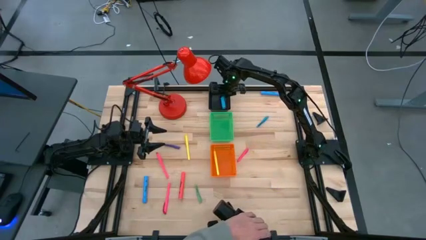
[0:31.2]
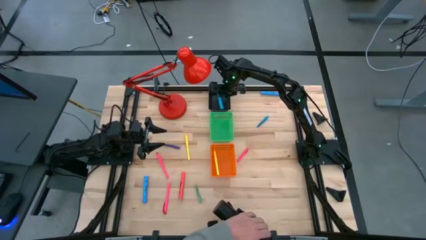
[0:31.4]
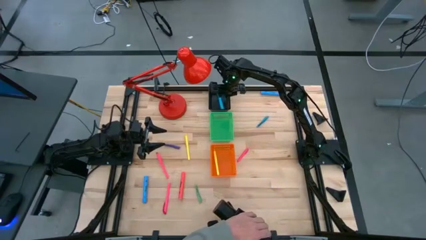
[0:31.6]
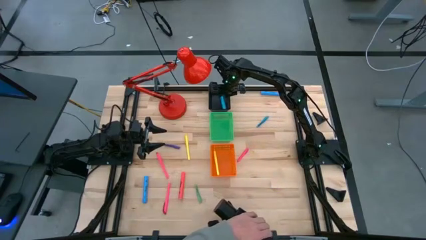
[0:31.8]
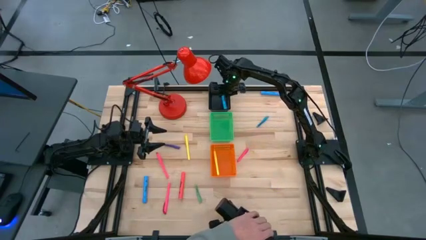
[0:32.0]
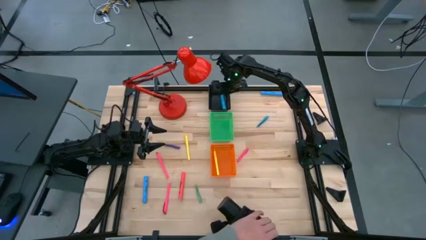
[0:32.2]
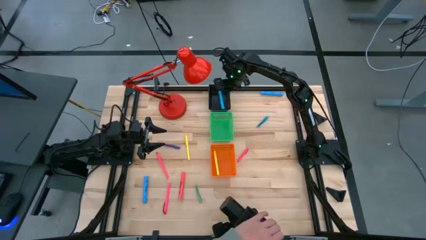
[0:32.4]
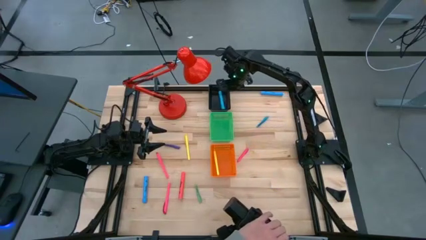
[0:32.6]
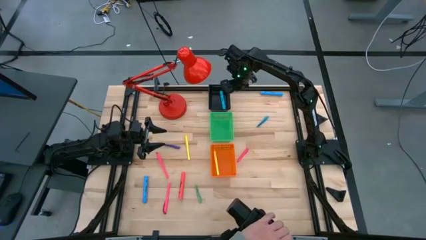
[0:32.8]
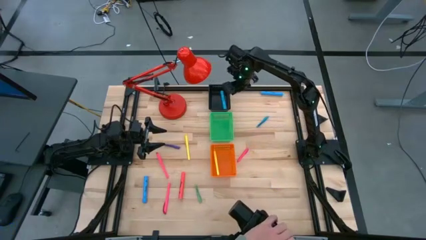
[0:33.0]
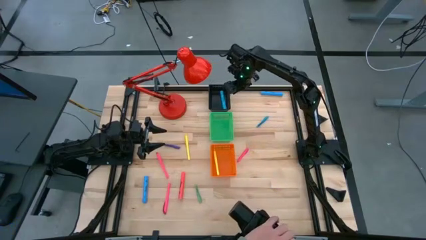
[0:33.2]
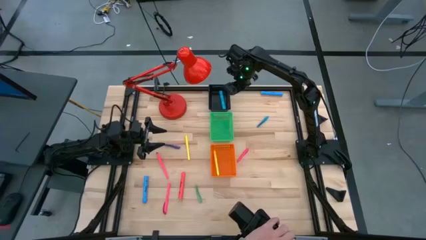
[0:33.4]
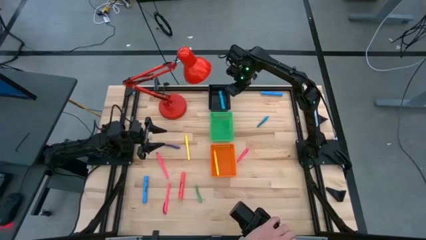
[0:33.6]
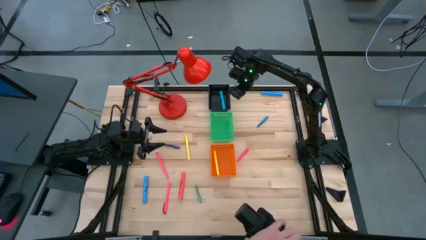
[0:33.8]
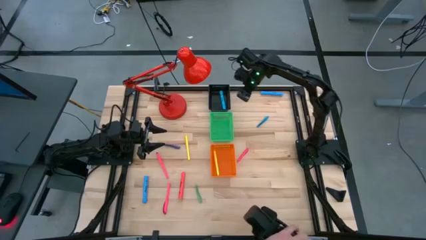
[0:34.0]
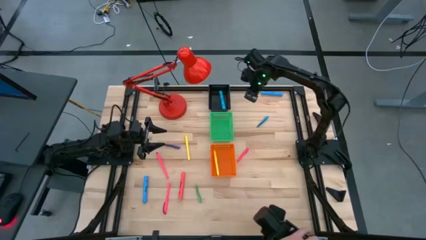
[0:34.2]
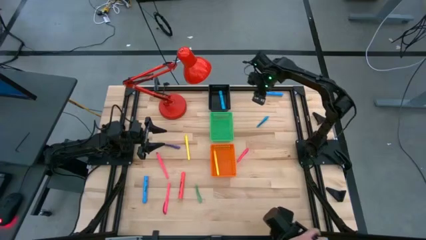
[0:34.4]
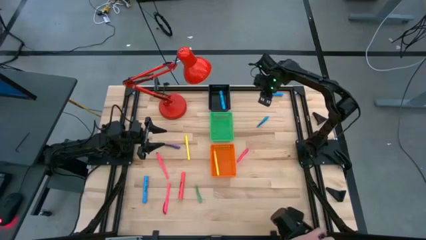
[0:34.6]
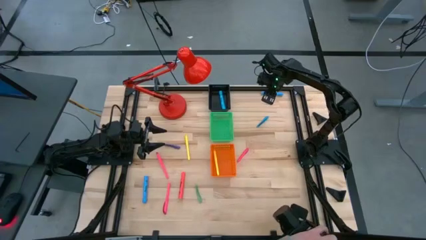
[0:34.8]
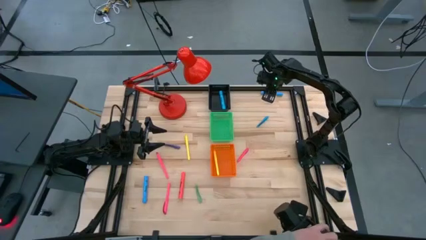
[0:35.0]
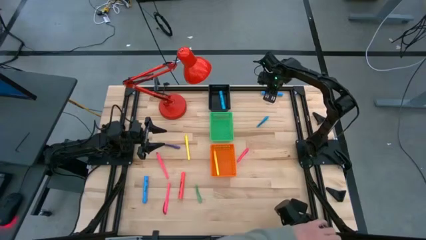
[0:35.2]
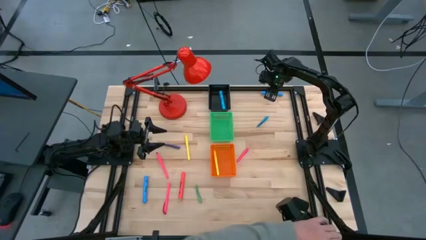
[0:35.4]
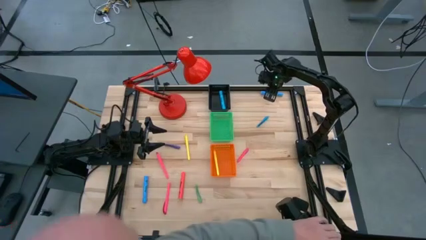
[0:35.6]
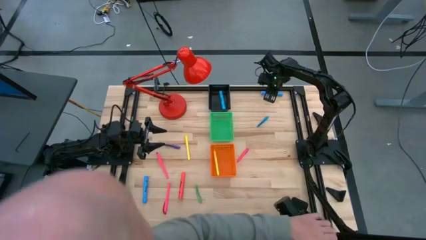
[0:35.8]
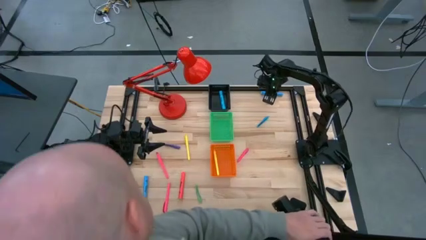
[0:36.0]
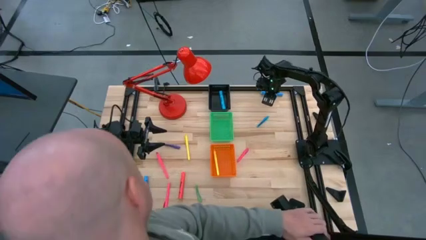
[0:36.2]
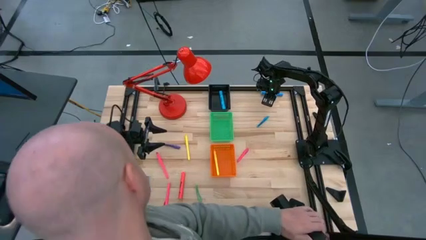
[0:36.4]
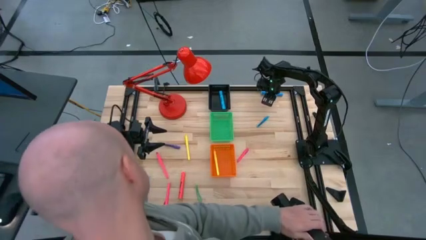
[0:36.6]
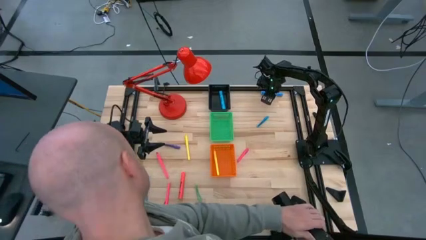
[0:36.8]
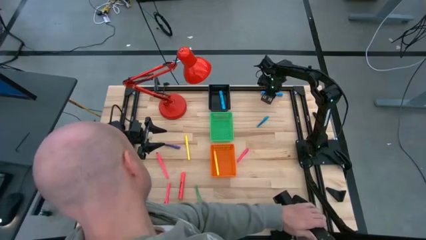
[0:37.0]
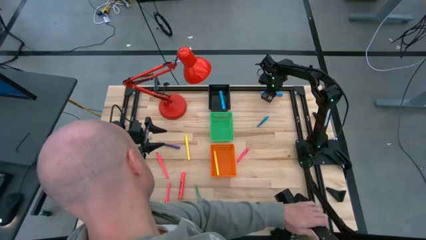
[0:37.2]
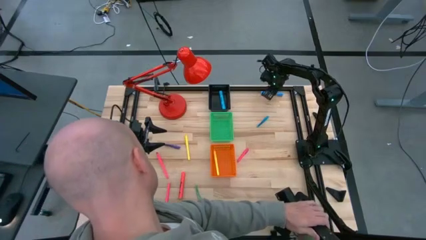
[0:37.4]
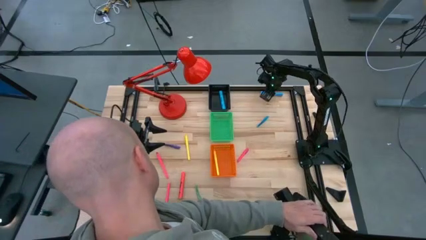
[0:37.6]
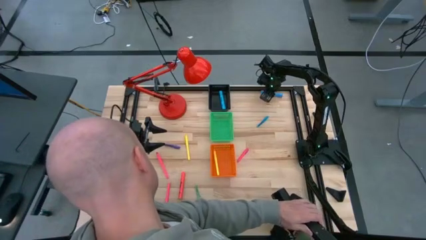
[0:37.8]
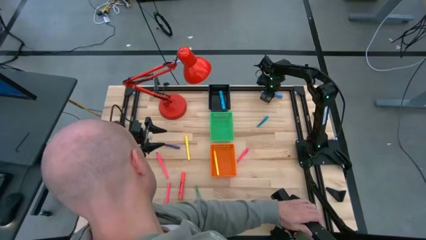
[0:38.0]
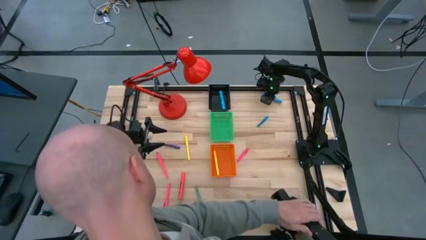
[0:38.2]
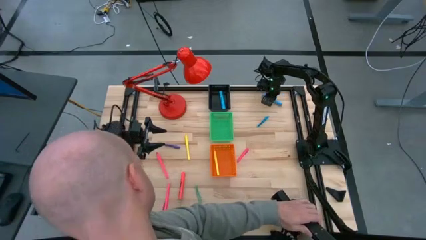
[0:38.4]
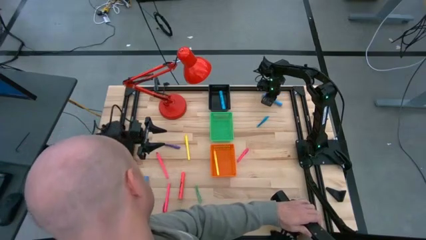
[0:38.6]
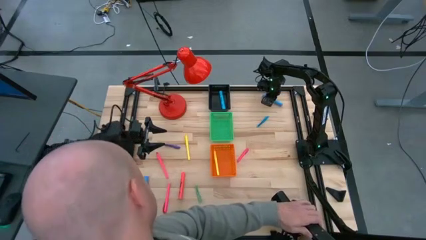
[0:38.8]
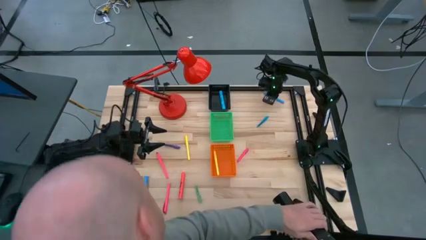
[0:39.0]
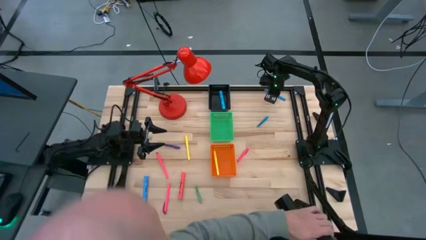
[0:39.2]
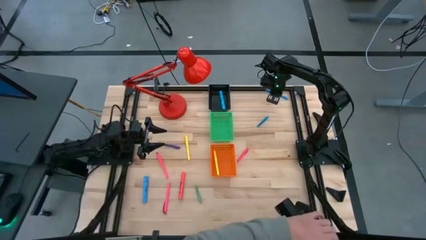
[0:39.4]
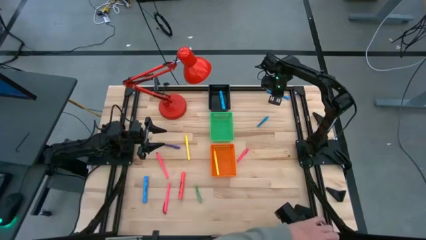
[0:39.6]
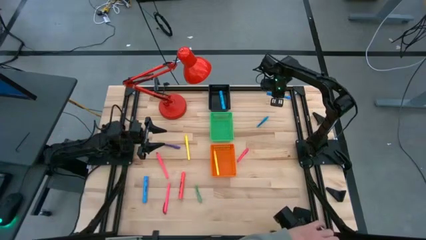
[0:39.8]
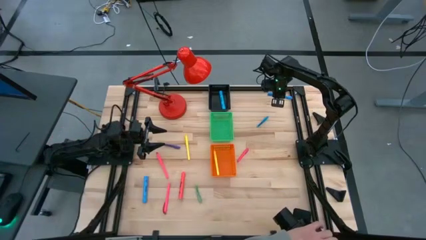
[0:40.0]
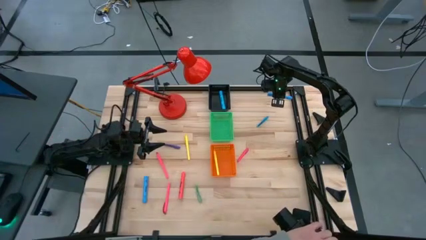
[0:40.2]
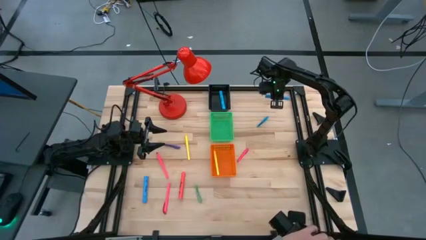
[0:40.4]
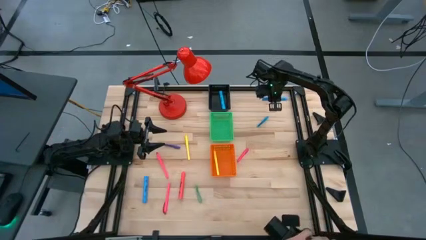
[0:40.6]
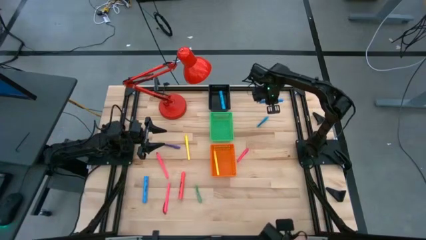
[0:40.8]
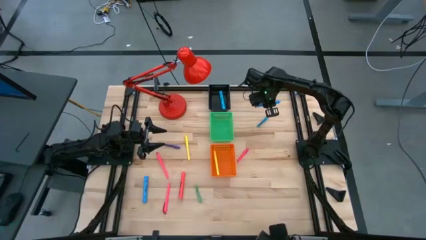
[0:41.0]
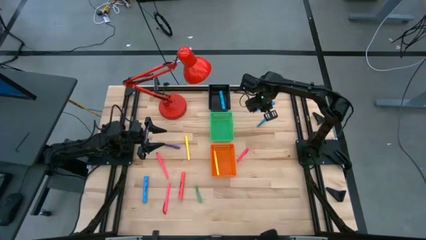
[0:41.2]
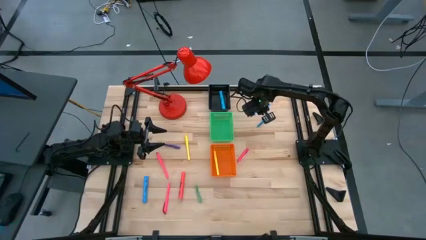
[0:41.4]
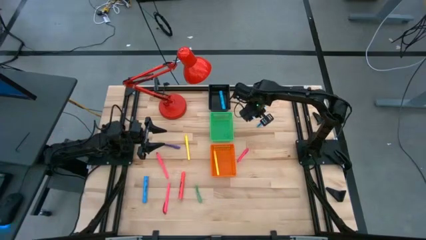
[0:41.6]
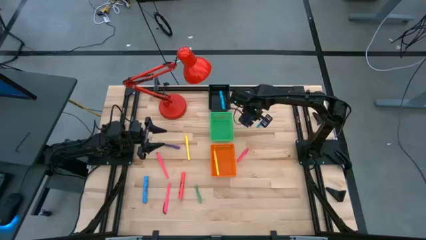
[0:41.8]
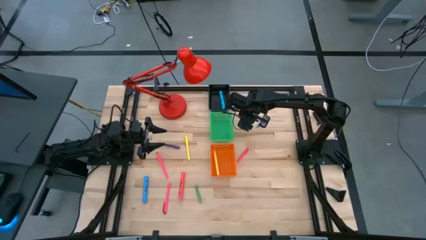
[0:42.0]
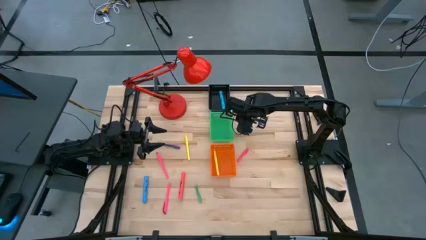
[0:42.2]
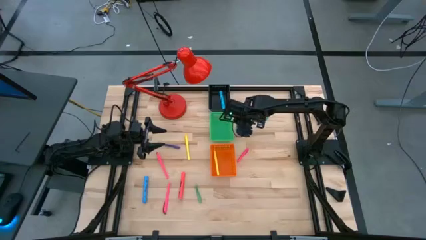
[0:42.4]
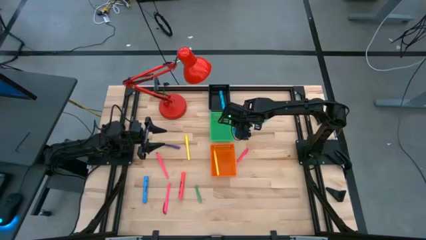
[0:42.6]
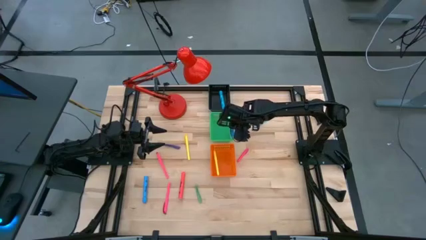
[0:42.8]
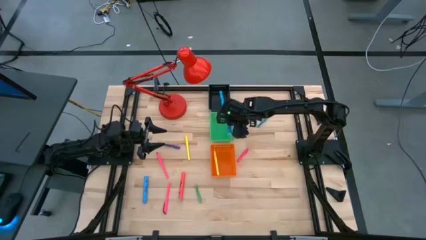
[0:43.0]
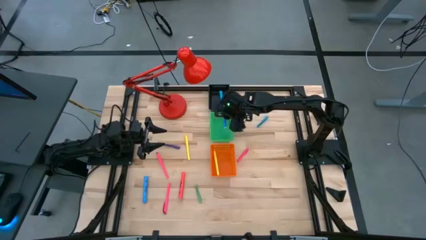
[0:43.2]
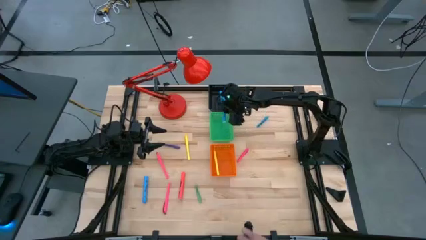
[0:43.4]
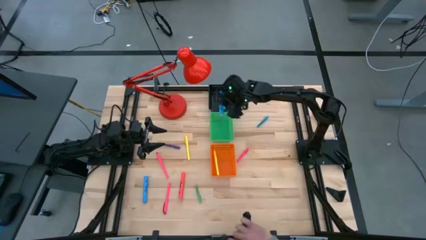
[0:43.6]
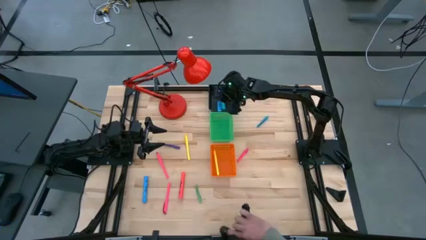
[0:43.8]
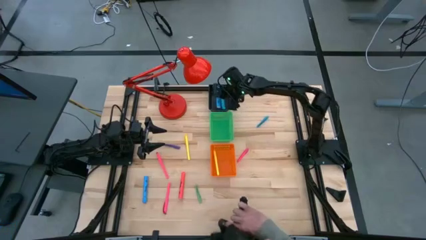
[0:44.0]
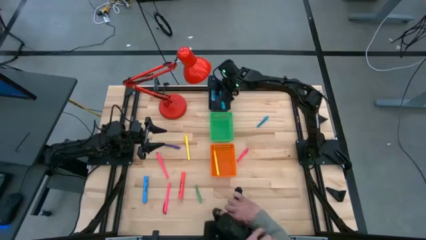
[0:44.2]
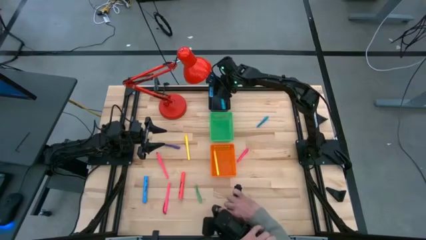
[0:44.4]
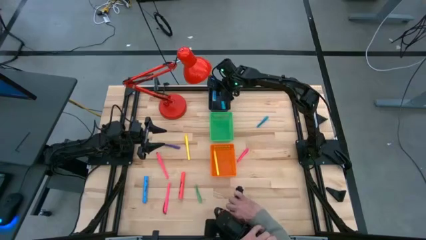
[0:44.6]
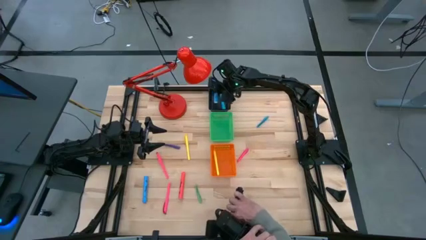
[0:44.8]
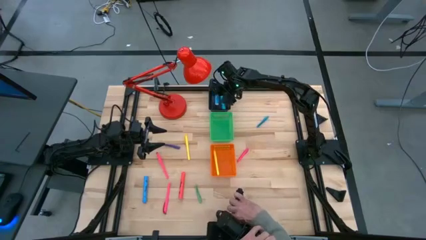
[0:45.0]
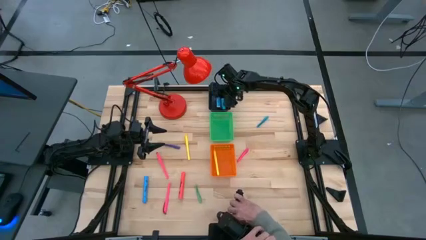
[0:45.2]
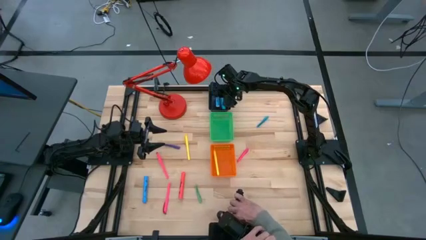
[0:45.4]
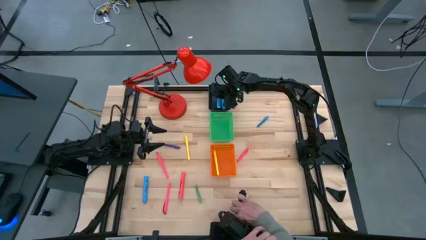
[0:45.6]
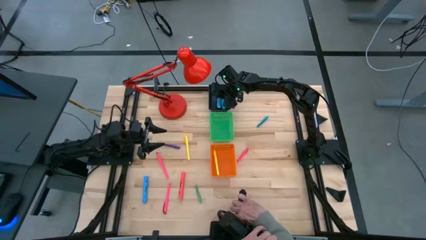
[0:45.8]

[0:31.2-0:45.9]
Task: Pick & Place Markers
Put the top blue highlighter into the black bin
